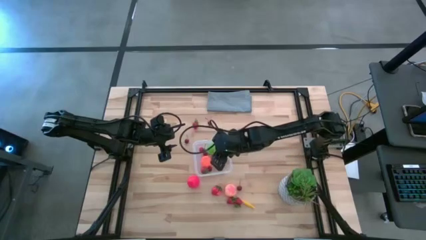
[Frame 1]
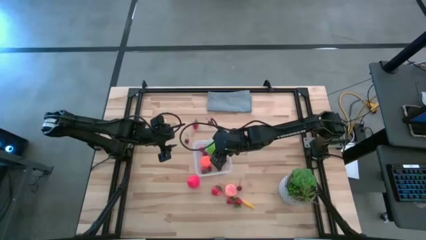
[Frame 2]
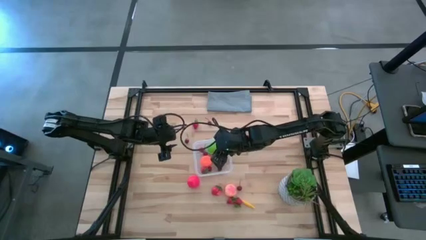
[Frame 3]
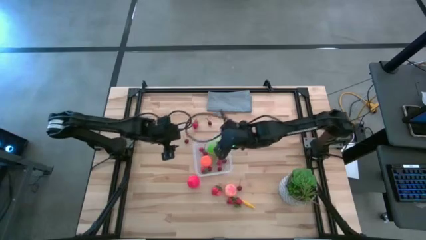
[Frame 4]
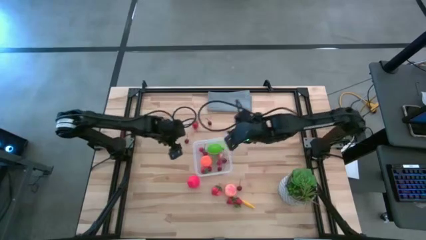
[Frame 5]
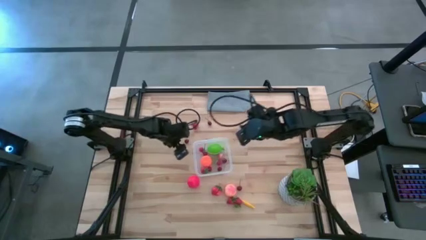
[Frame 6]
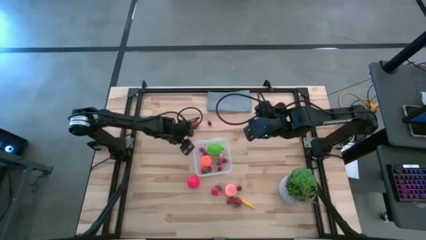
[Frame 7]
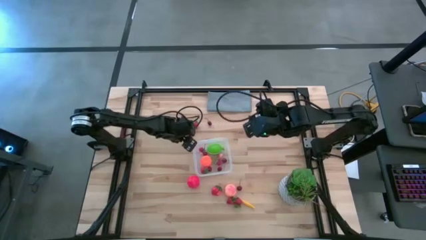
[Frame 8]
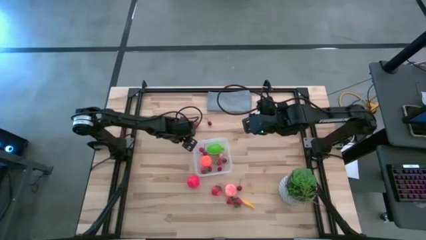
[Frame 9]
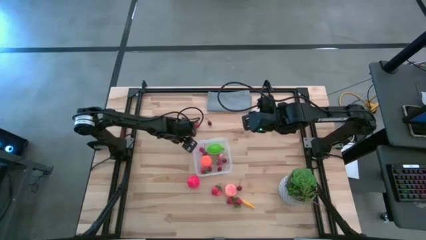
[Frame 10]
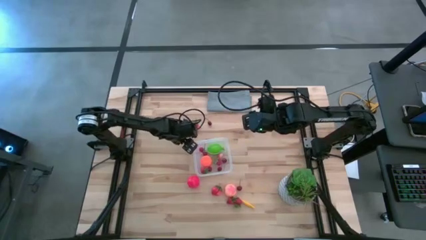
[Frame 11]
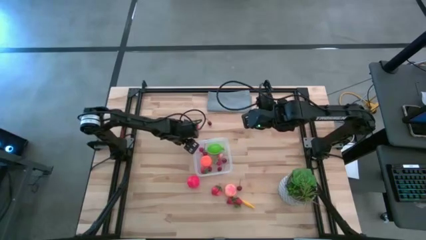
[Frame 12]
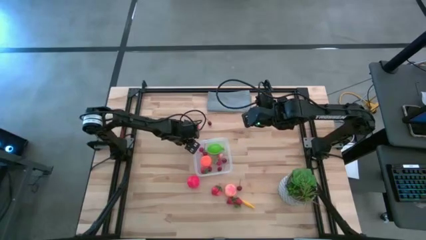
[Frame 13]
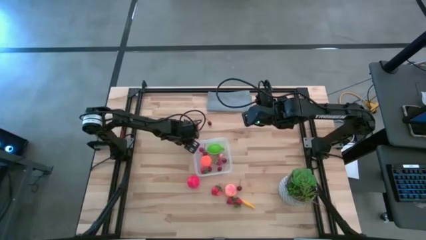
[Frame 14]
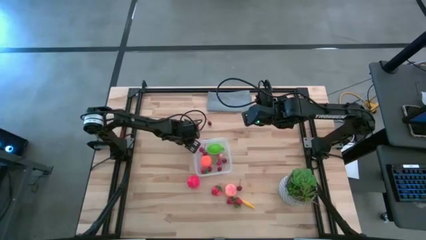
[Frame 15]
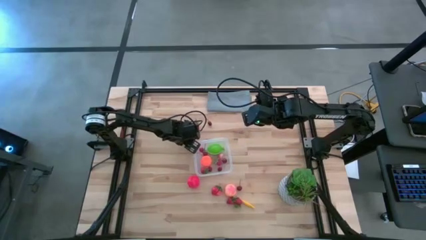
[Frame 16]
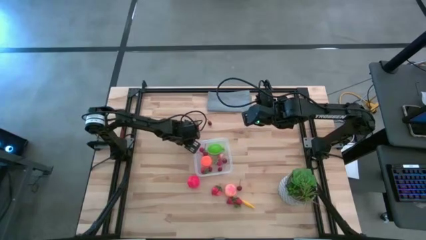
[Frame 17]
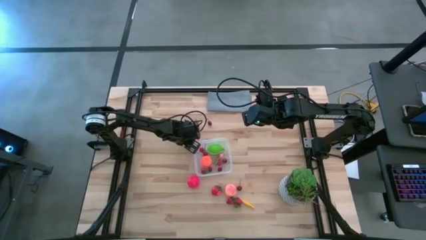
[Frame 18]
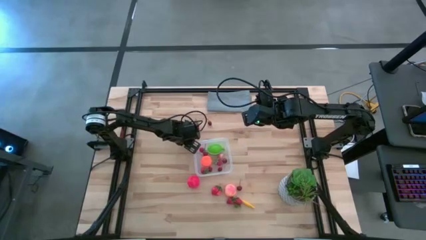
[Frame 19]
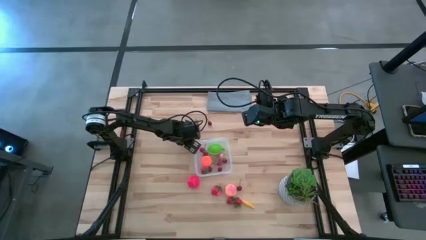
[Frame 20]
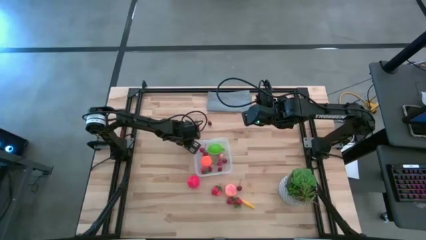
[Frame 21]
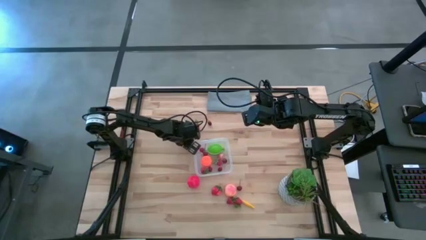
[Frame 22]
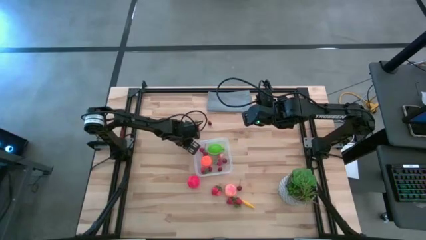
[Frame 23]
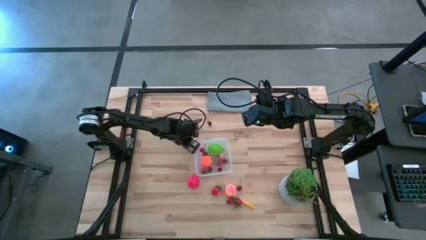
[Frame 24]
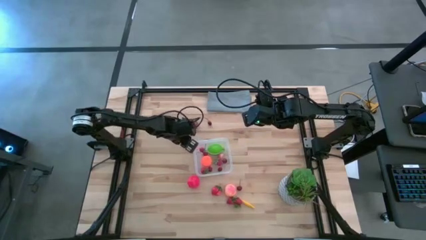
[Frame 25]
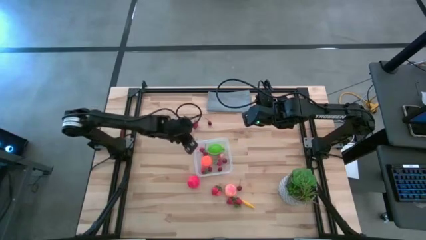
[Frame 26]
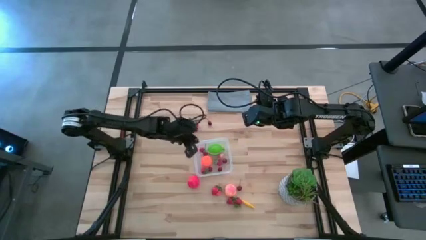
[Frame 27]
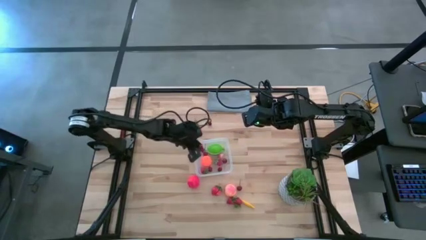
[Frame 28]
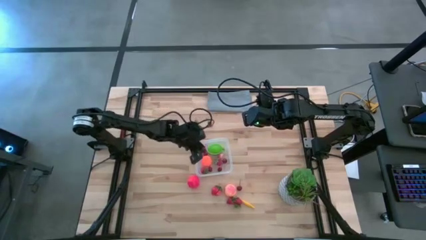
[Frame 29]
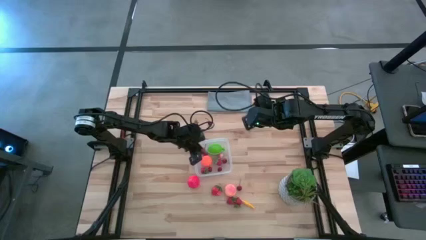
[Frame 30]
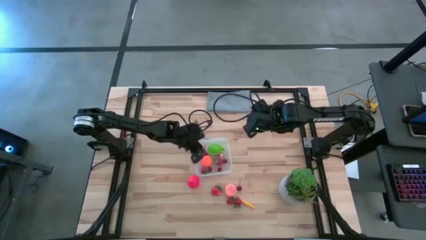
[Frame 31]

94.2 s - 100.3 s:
Task: Pick and placing Produce into tupperware
Put the red cherry into the transparent container

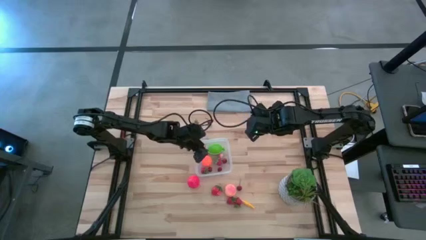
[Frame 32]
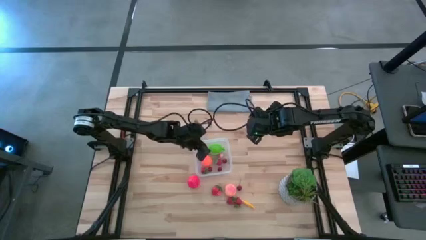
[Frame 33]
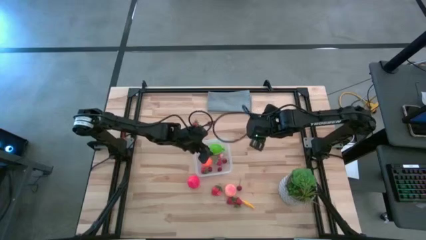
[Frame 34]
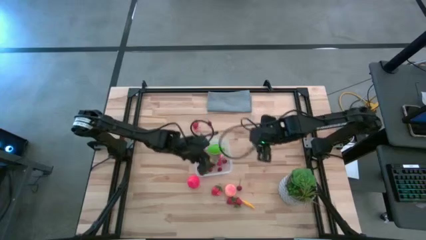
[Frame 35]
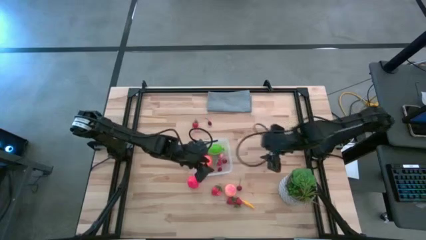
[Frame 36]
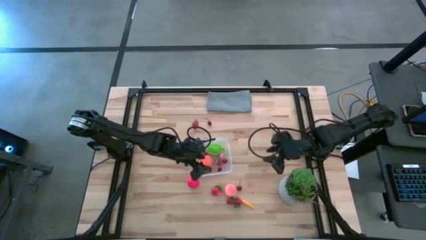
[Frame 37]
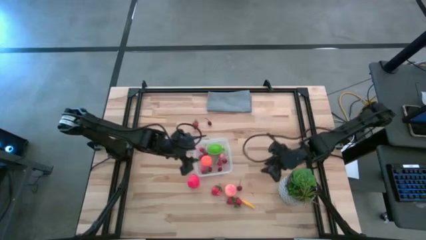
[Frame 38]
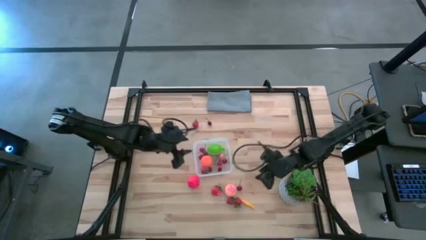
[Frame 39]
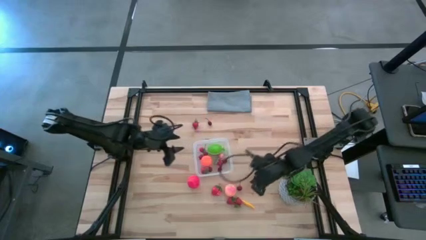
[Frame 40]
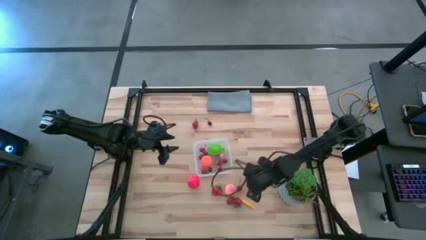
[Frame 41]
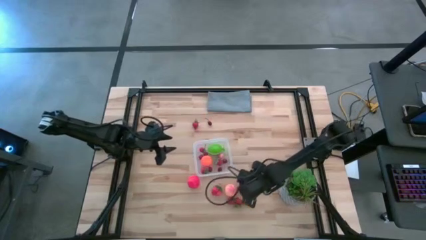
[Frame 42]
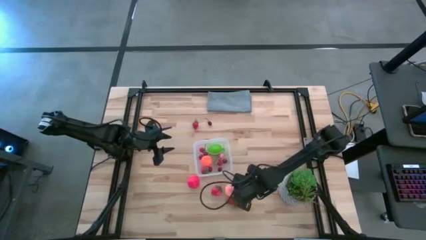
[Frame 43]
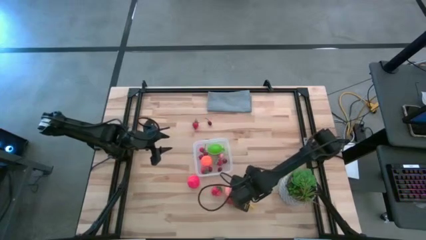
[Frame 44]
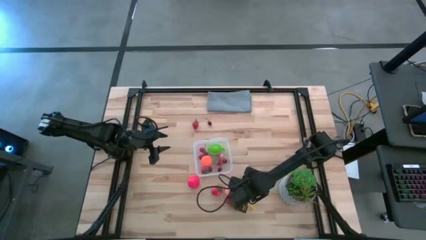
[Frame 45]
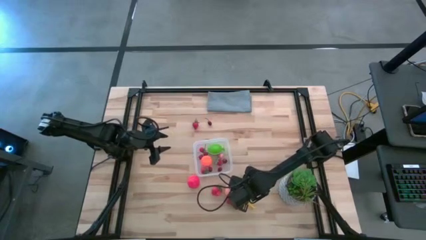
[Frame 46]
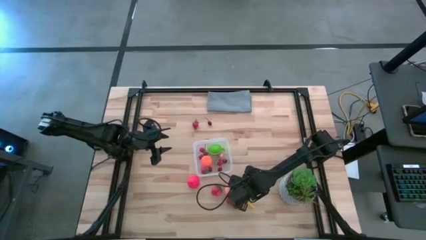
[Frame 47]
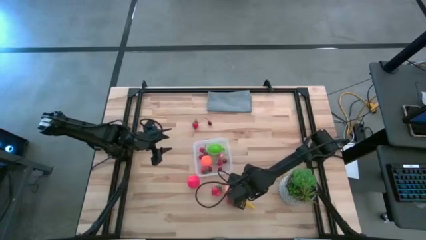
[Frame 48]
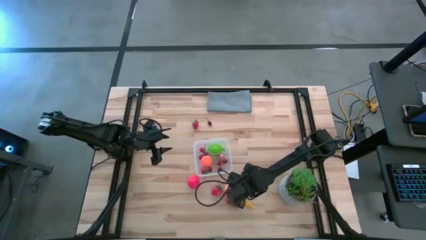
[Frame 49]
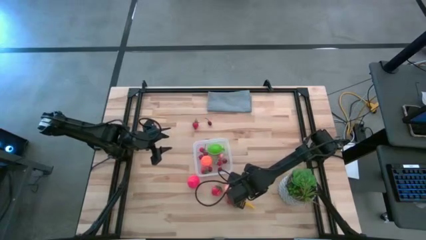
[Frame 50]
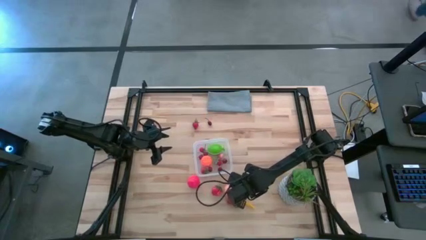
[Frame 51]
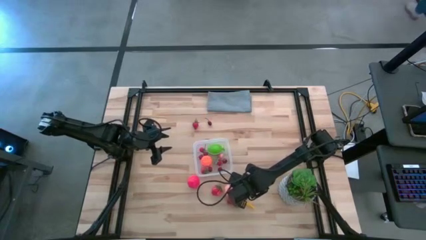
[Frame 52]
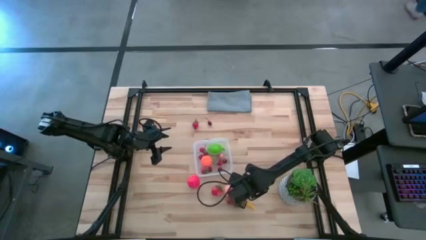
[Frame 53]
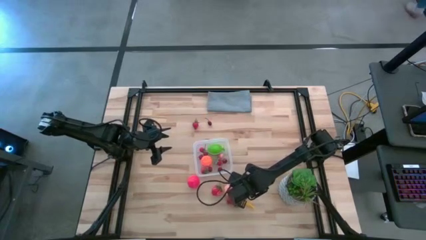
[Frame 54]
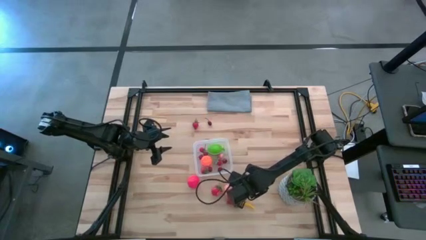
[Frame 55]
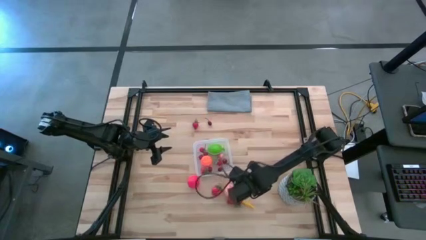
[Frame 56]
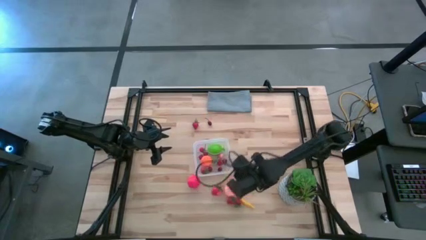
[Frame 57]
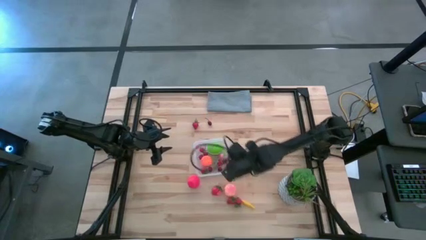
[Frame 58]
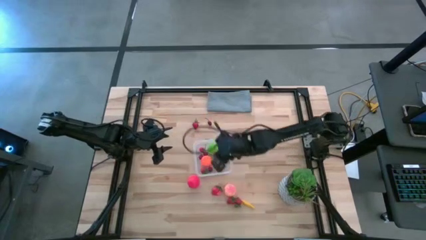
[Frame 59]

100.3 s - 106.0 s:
Put the red cherry into the transparent container

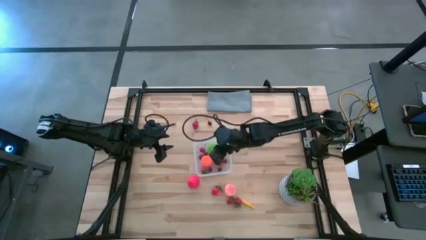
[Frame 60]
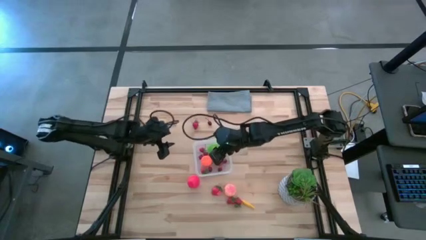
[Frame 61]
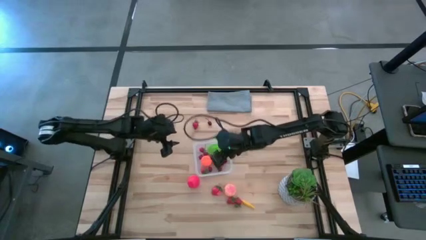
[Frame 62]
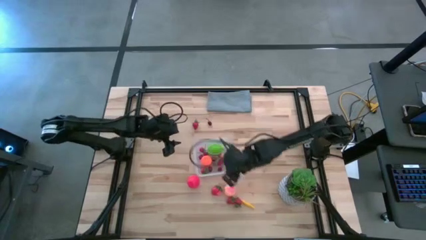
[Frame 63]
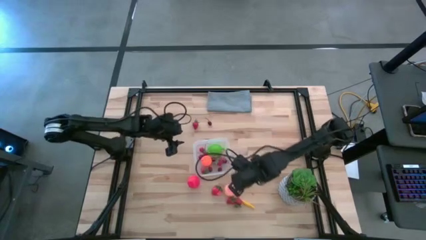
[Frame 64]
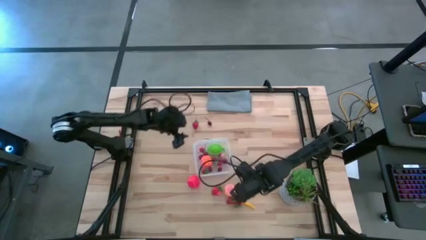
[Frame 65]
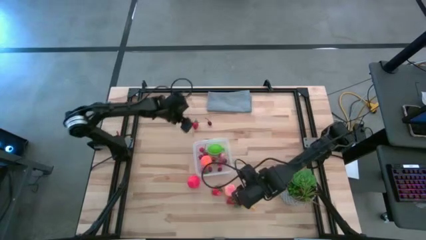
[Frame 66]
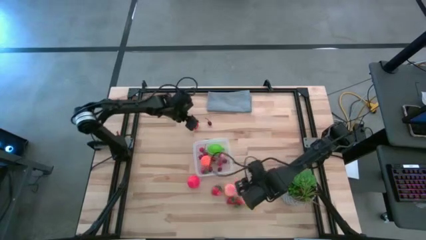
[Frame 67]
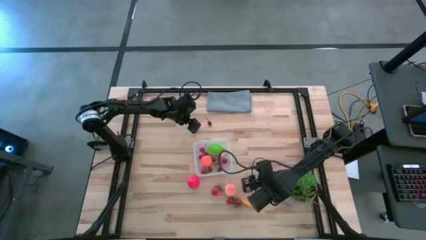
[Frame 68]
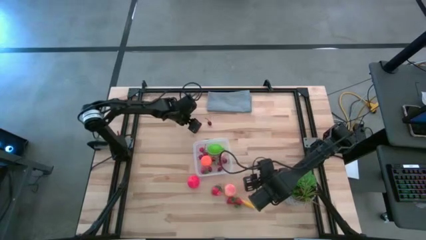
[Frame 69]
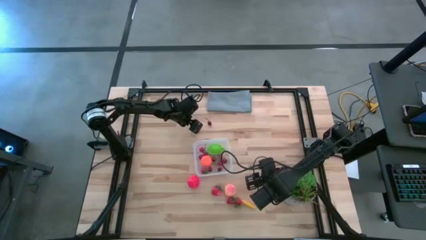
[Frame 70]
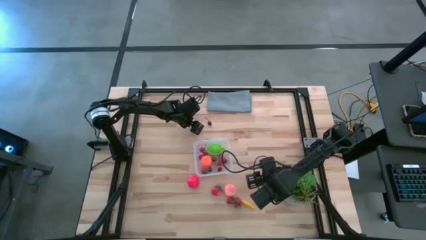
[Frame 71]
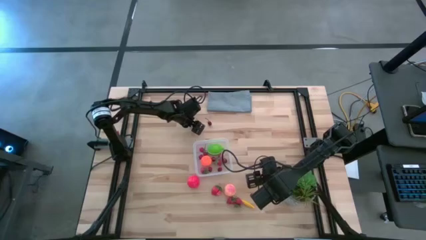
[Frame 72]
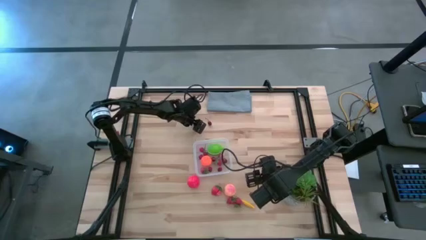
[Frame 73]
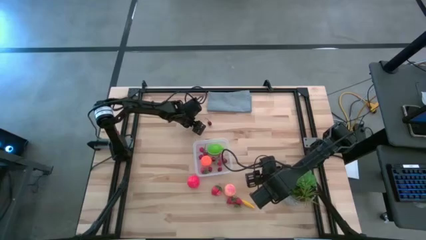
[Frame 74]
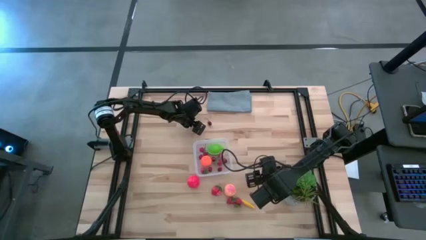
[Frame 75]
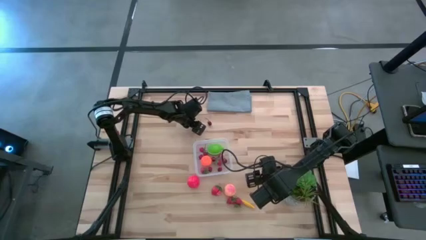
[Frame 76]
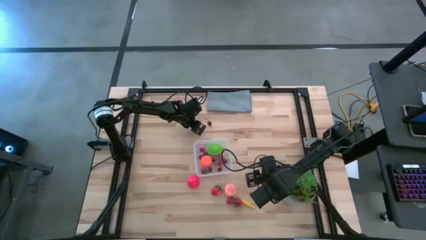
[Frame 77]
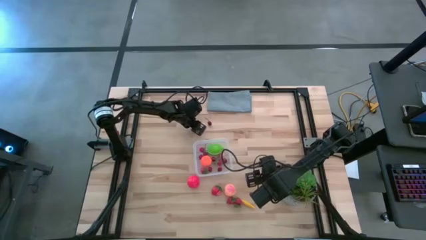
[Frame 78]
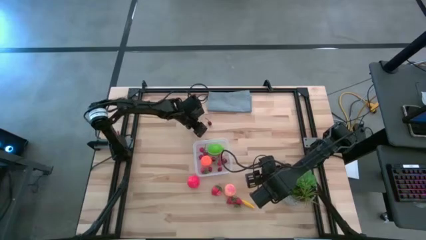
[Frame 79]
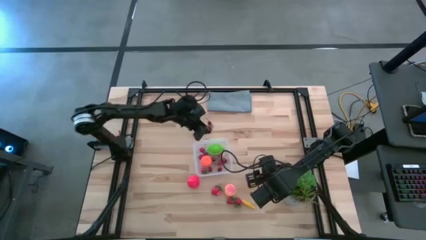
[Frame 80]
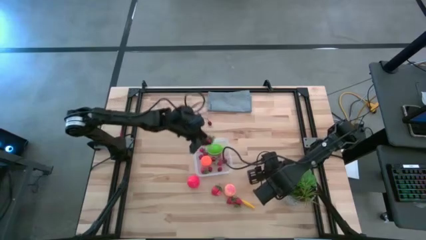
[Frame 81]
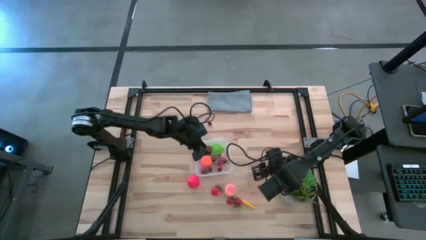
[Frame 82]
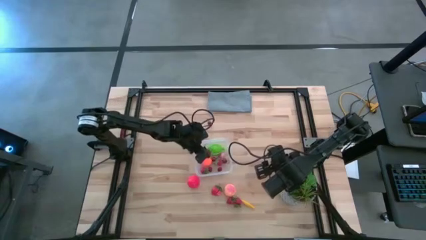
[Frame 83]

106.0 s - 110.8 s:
Put the red strawberry into the transparent container
